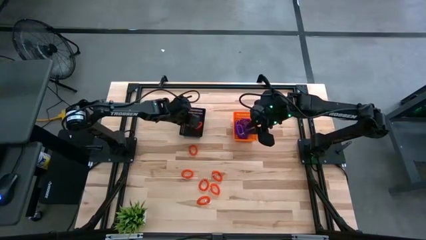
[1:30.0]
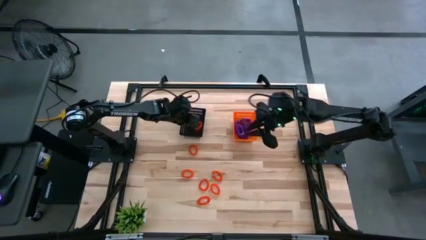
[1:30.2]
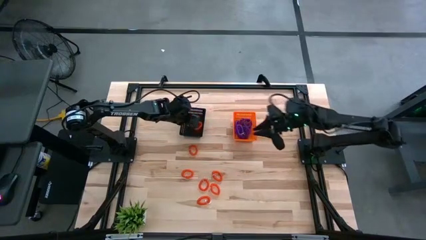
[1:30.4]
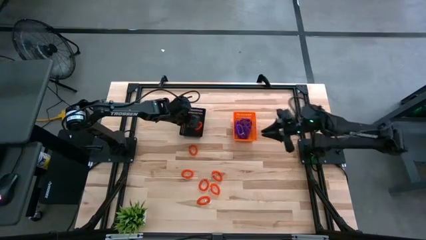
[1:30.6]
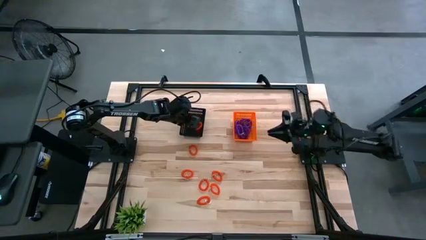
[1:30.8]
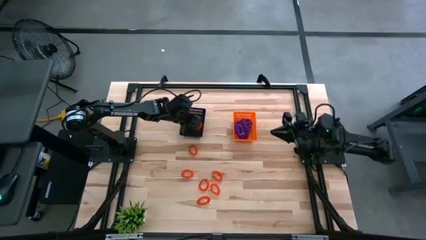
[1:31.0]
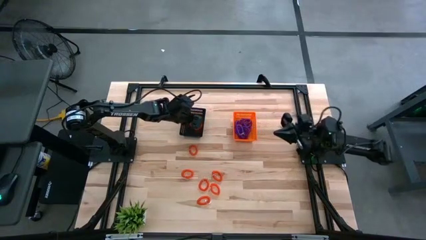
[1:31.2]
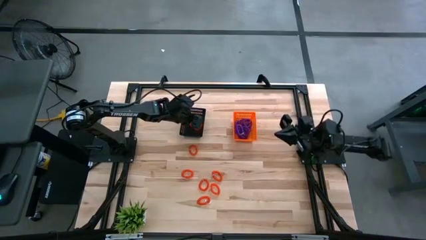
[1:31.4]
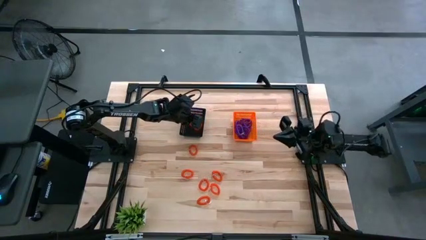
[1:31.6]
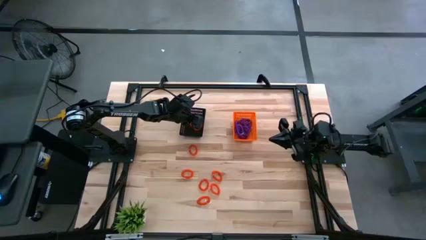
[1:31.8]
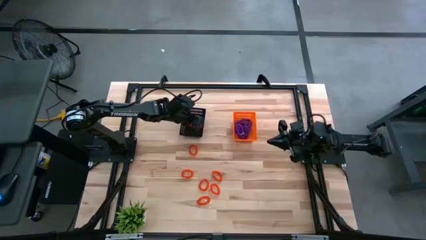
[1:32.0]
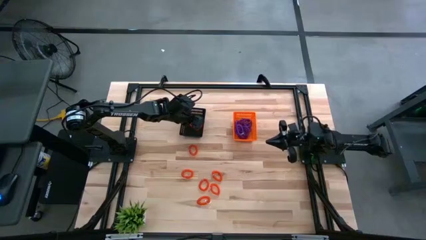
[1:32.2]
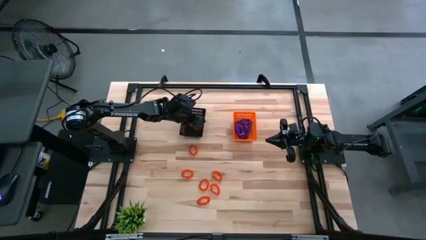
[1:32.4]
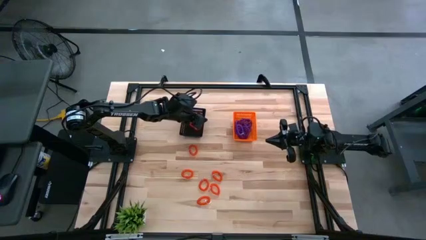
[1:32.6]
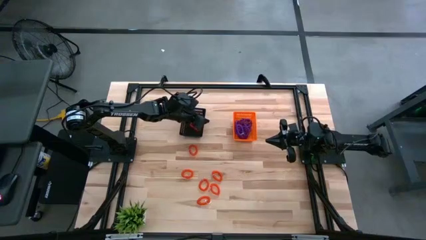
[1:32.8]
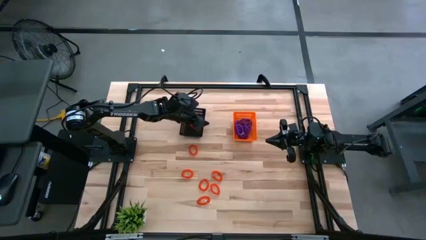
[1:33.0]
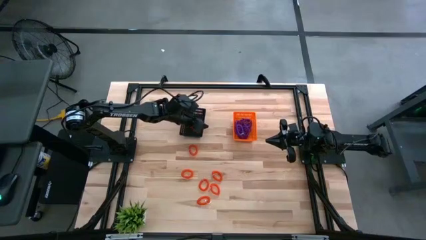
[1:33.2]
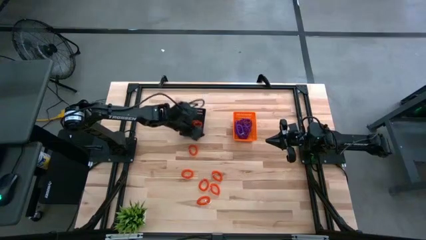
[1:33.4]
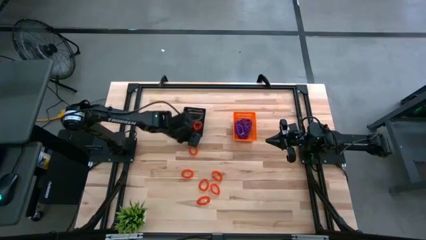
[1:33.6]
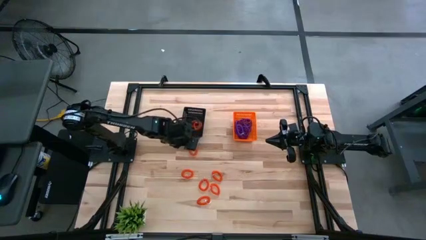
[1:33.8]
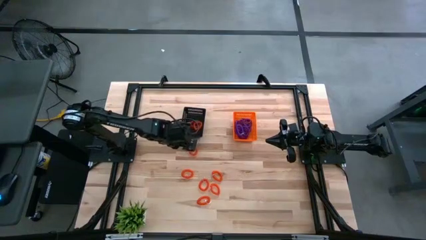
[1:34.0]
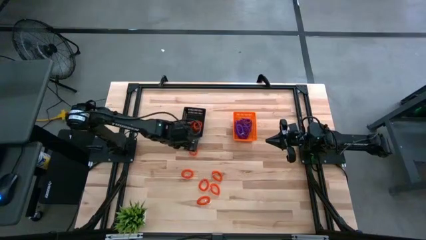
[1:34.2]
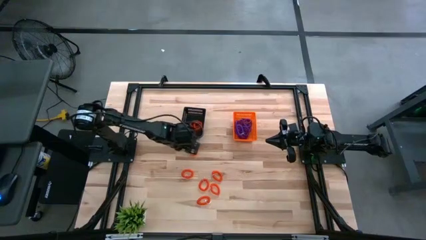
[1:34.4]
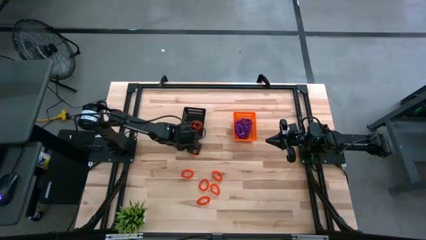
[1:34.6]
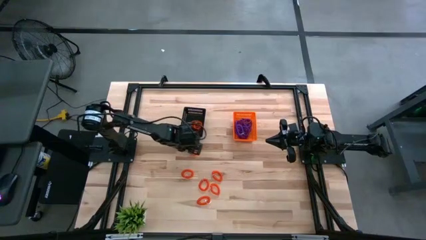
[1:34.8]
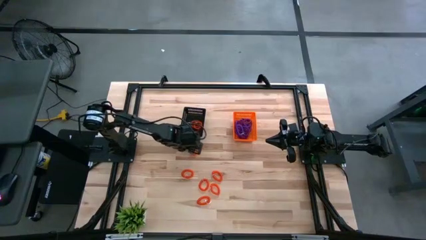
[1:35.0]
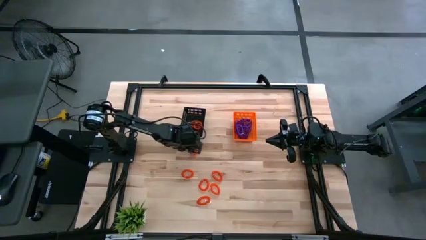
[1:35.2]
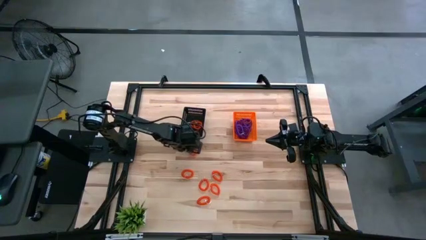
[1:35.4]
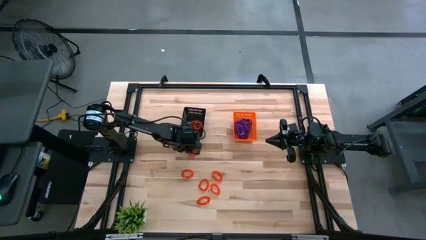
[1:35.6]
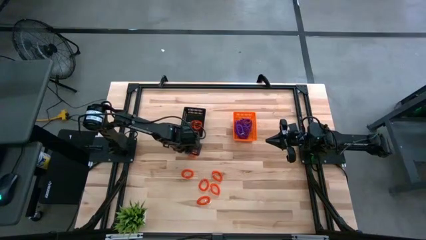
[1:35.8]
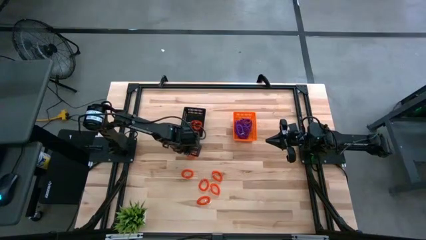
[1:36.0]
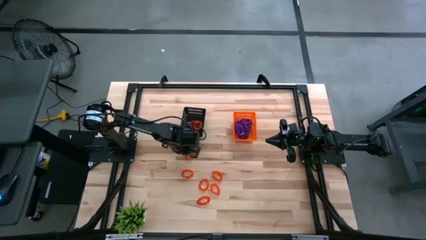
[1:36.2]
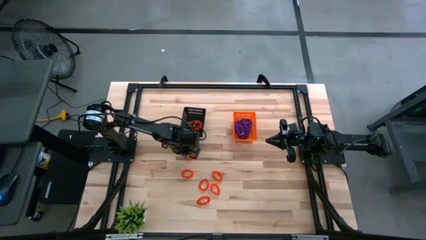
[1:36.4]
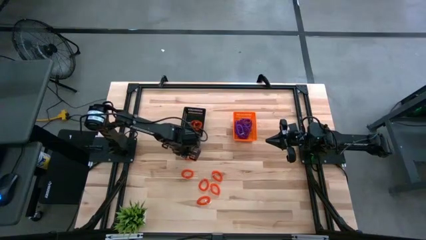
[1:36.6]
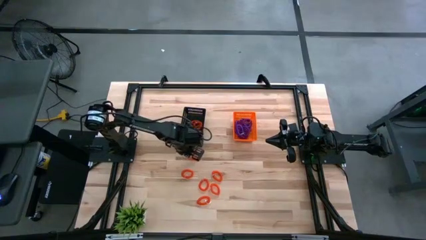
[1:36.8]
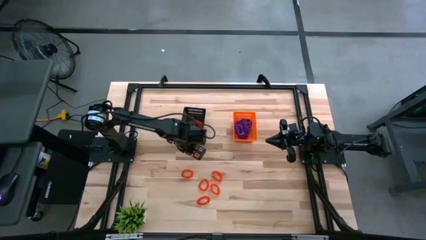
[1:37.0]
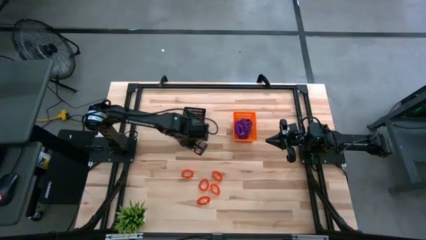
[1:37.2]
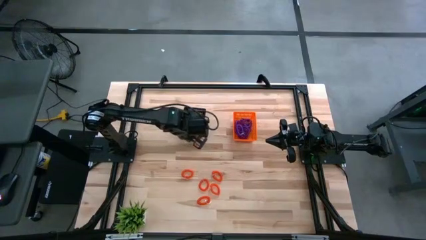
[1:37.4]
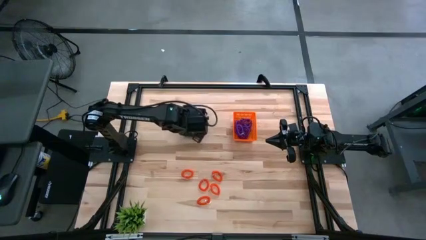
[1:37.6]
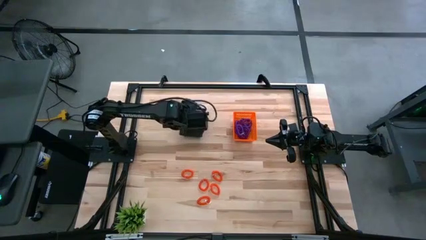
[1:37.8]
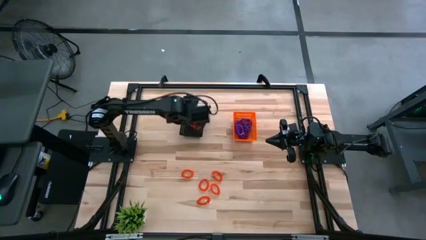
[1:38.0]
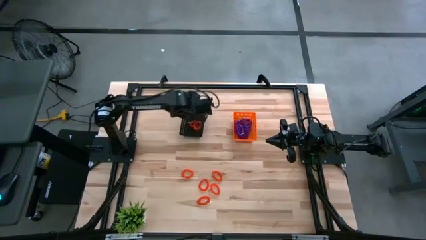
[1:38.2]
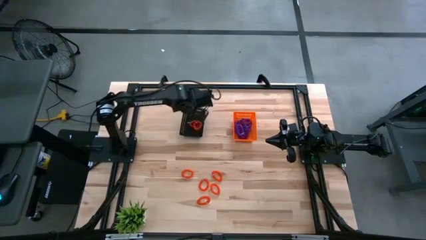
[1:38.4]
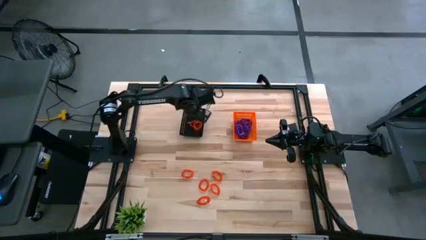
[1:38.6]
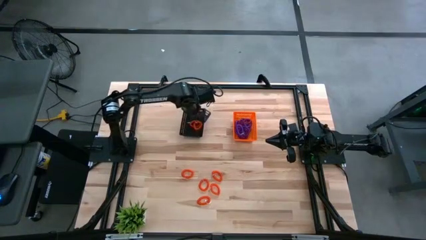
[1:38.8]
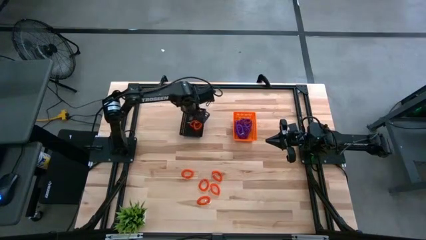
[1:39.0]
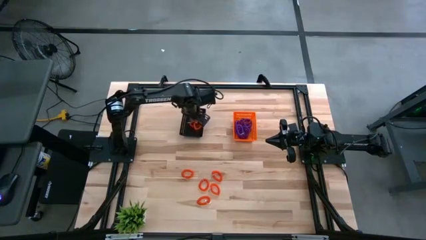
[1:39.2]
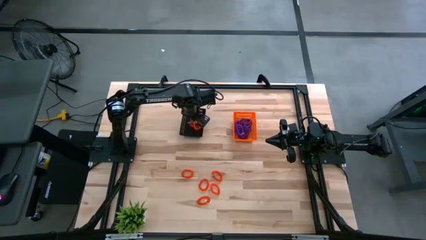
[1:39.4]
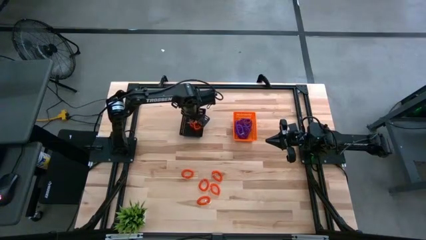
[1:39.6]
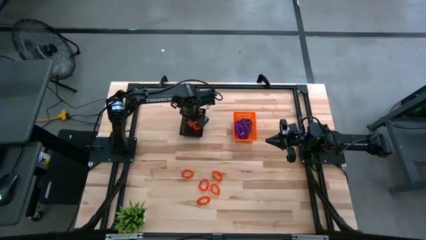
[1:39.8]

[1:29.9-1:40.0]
Task: Sort spring keychains into baskets
Put the orange spring keychain into the black basket

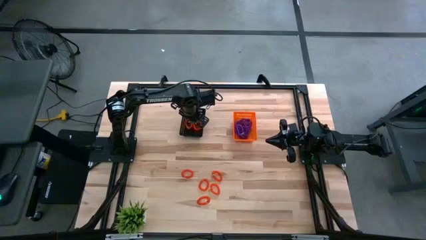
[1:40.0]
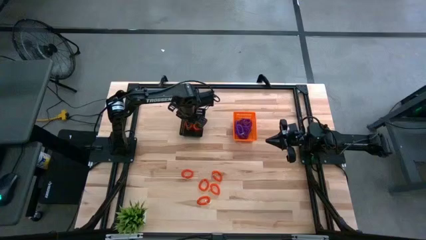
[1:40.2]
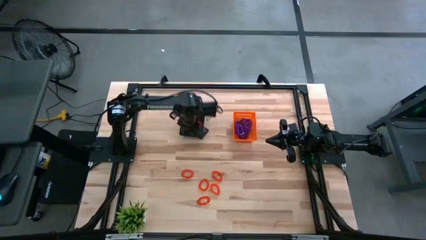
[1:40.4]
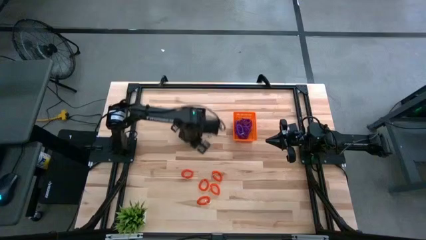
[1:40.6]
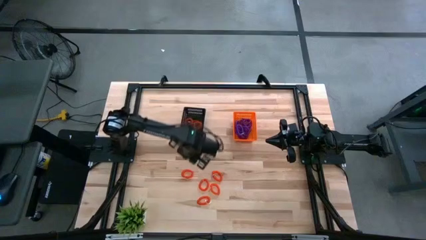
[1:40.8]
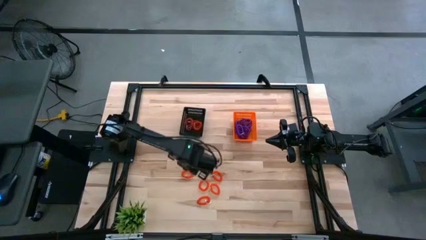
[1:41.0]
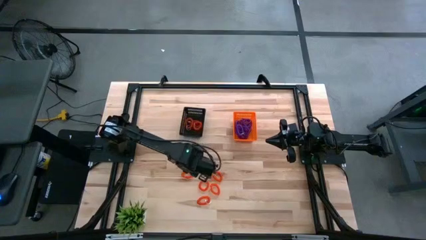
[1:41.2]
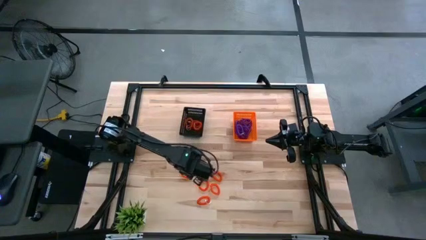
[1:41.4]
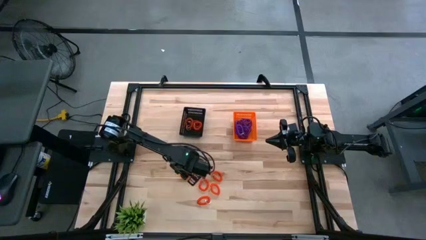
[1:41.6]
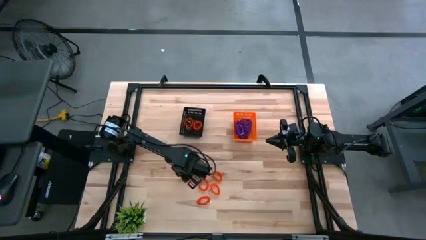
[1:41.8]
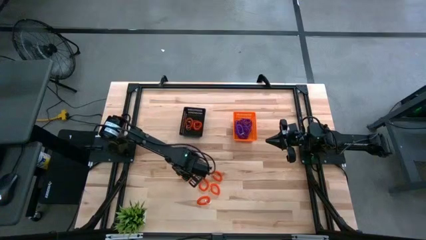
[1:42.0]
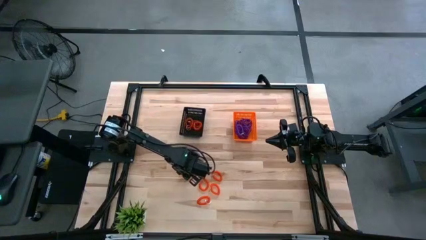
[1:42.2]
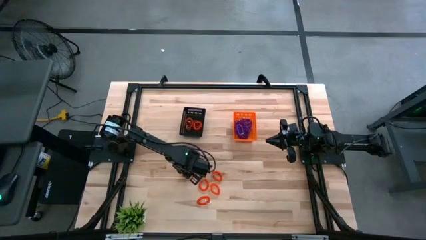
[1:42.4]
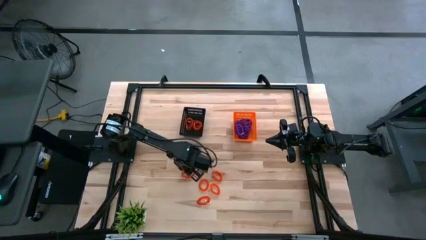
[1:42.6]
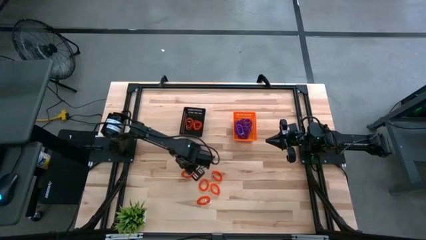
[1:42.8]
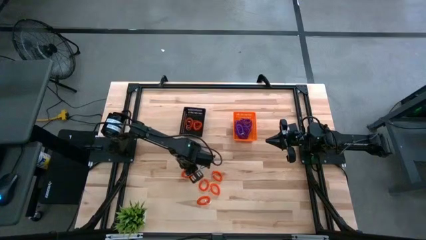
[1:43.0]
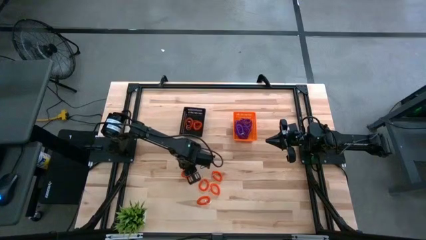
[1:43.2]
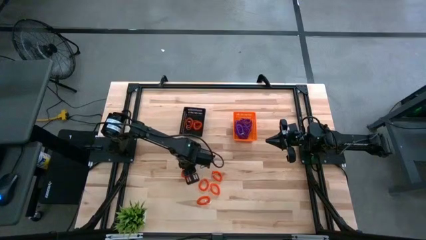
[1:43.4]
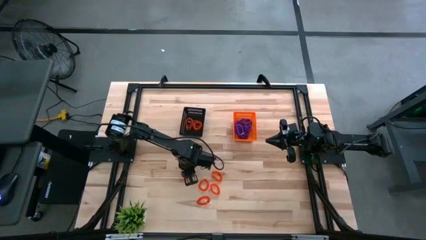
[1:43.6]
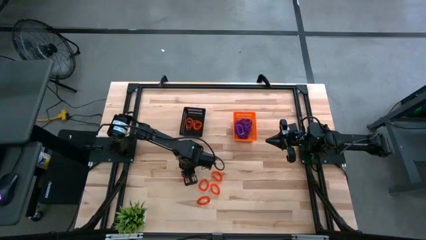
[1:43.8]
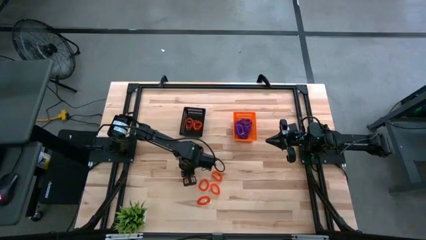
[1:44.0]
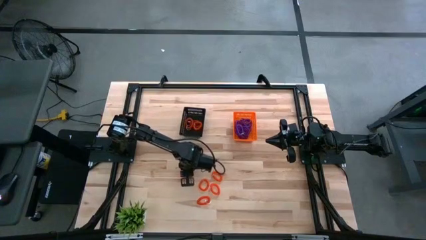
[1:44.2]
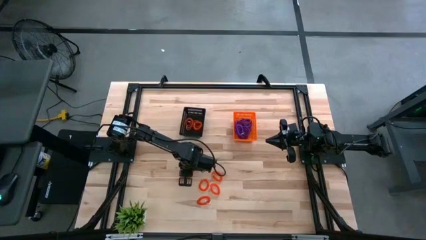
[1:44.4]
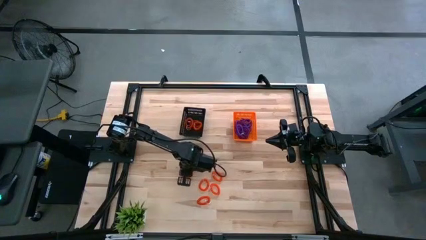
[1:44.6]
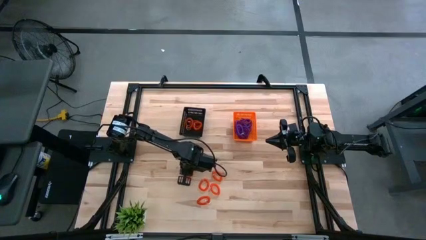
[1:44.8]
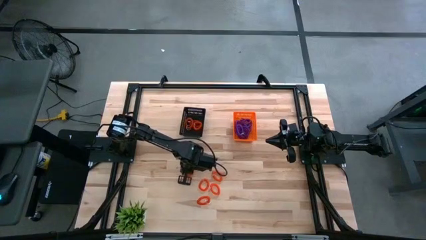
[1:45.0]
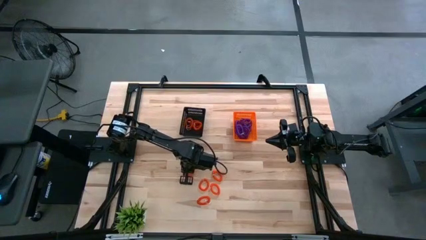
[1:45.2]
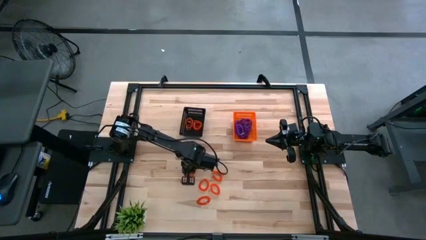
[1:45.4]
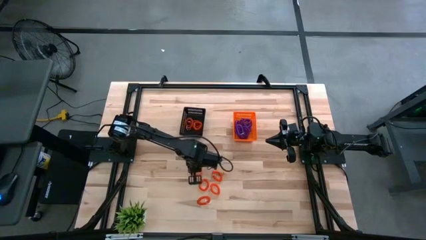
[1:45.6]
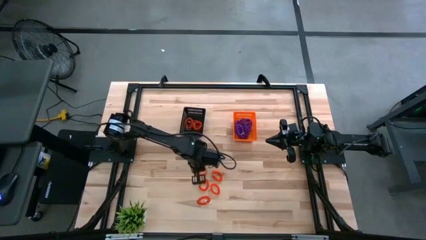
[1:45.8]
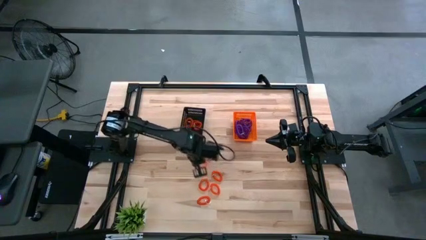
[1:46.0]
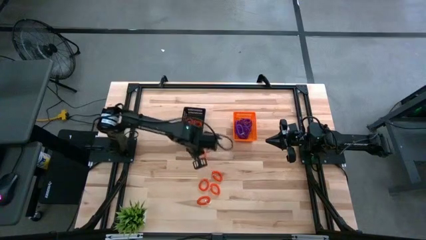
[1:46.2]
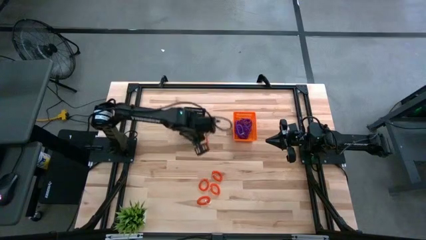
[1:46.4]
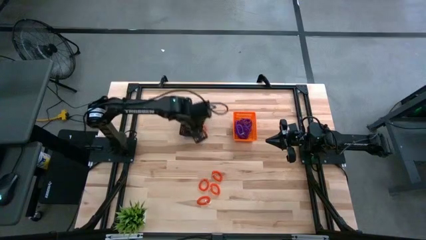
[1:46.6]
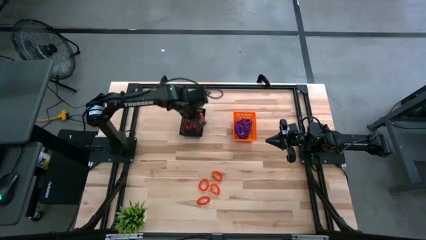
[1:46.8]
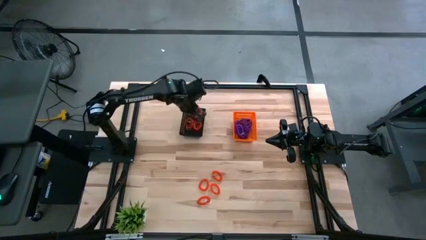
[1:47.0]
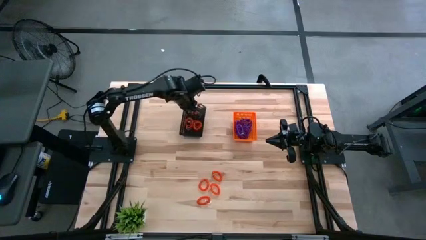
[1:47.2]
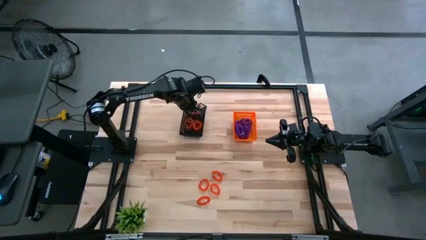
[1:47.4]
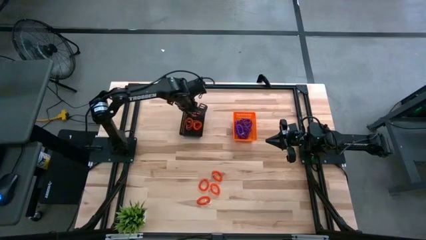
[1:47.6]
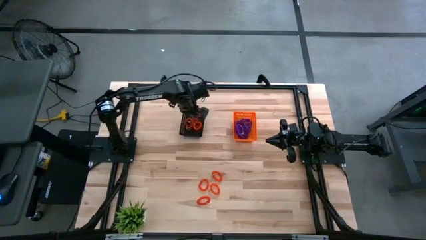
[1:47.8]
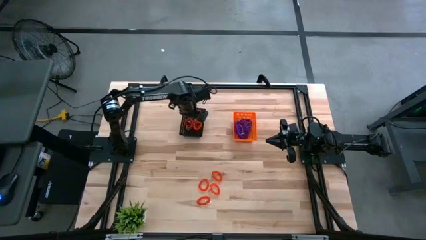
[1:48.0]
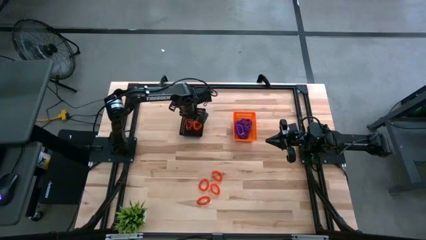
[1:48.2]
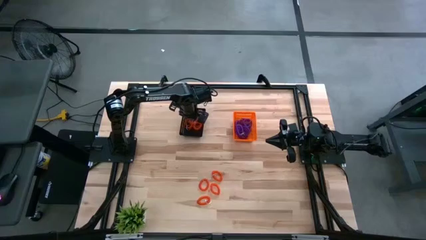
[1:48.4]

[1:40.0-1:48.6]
Put the orange spring keychain into the black basket
